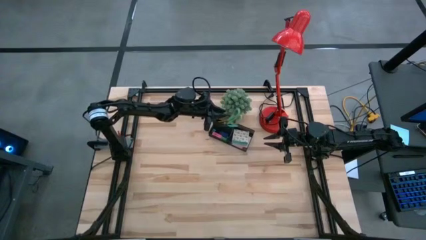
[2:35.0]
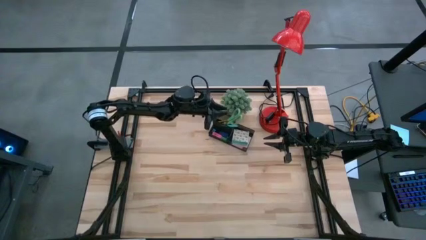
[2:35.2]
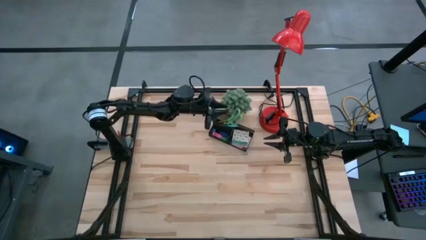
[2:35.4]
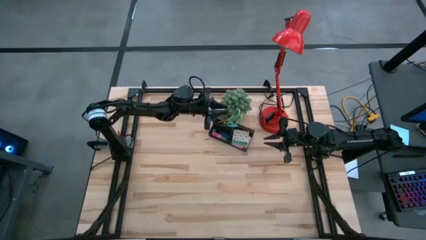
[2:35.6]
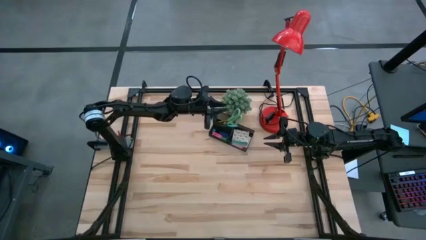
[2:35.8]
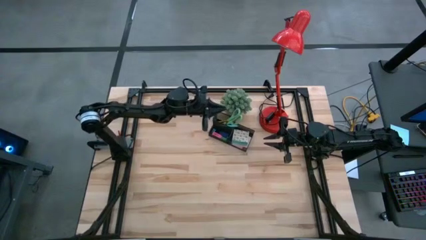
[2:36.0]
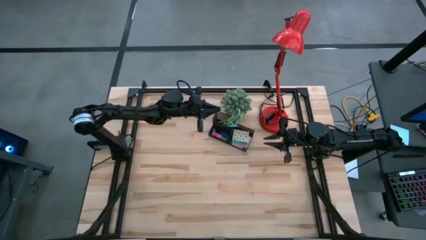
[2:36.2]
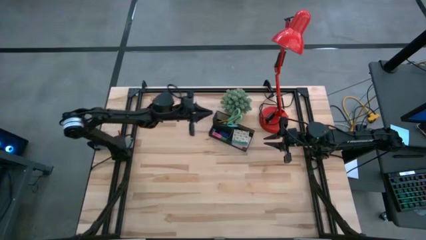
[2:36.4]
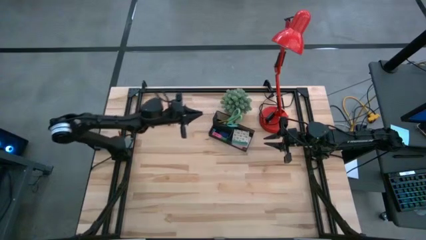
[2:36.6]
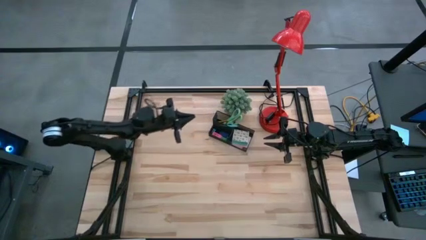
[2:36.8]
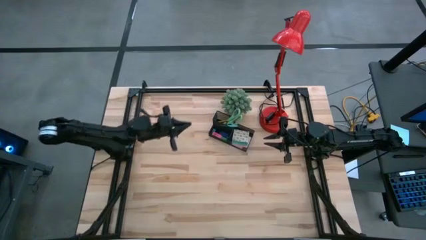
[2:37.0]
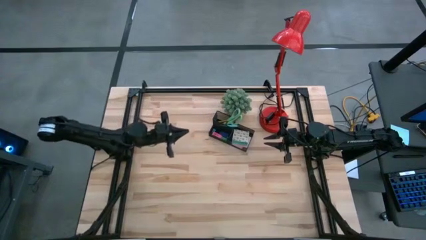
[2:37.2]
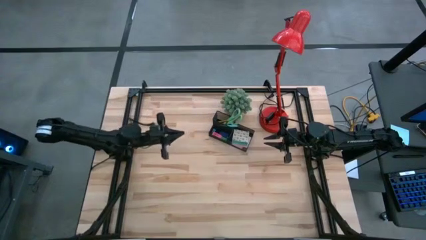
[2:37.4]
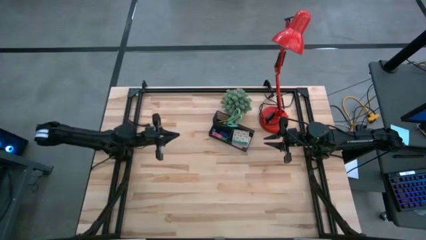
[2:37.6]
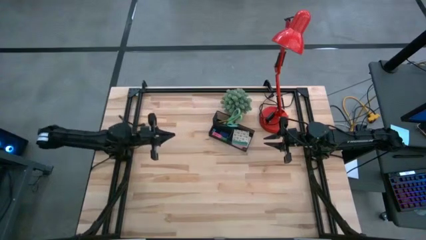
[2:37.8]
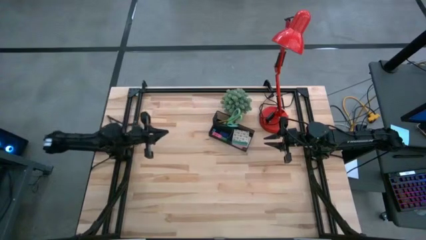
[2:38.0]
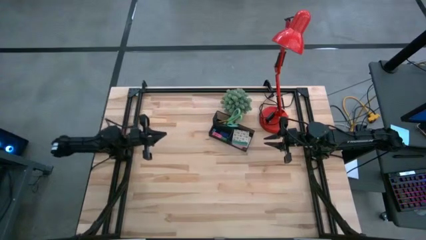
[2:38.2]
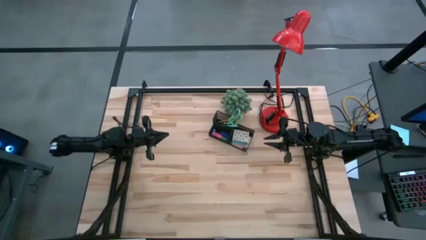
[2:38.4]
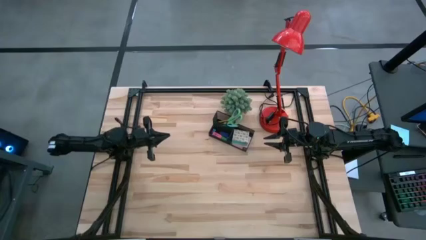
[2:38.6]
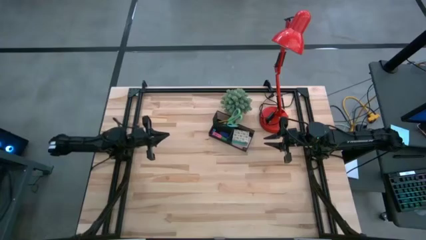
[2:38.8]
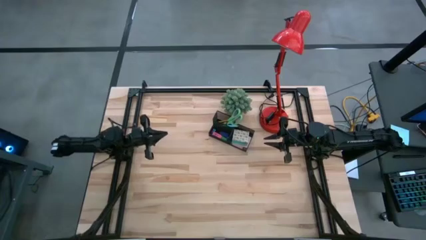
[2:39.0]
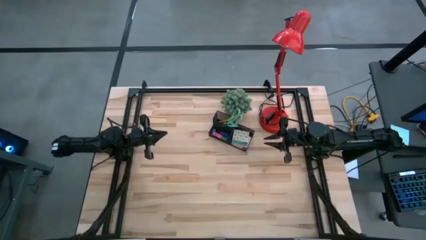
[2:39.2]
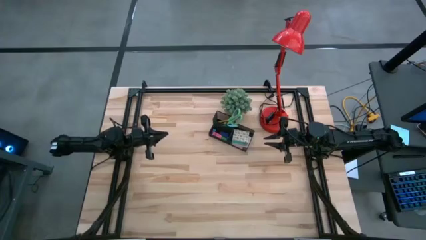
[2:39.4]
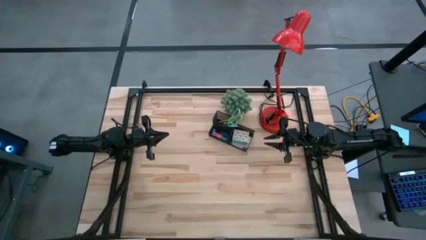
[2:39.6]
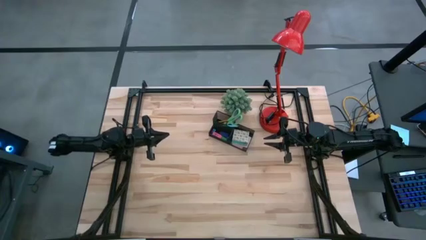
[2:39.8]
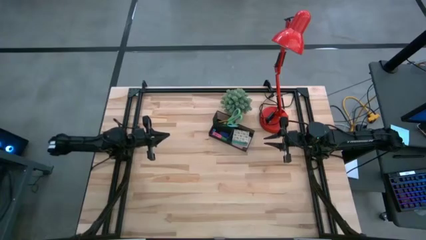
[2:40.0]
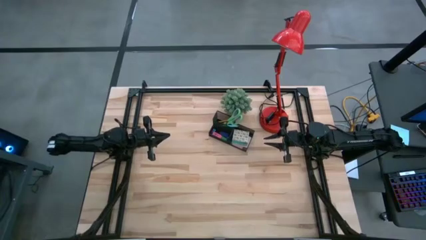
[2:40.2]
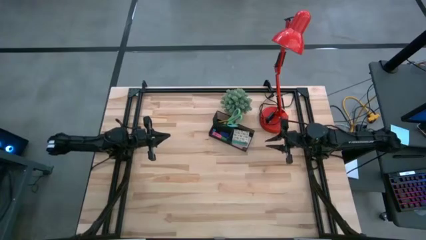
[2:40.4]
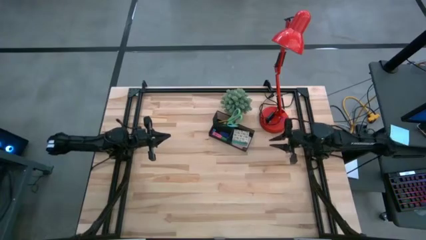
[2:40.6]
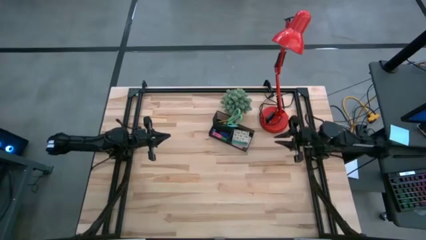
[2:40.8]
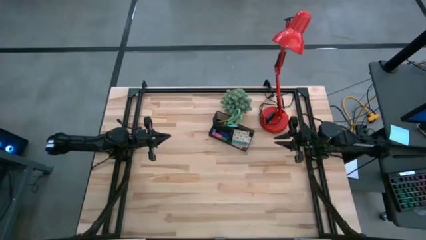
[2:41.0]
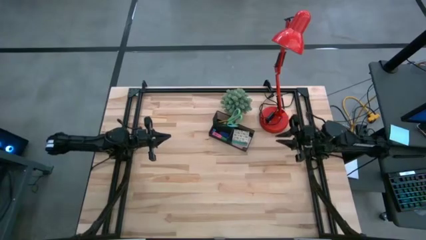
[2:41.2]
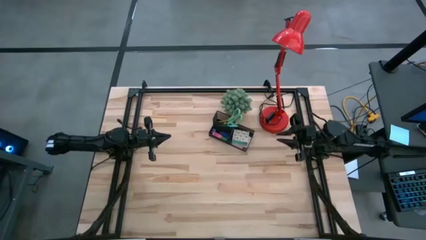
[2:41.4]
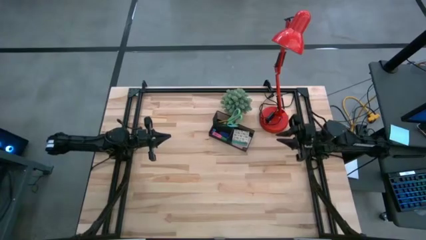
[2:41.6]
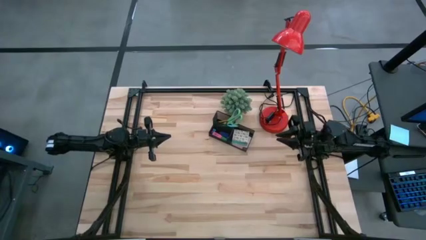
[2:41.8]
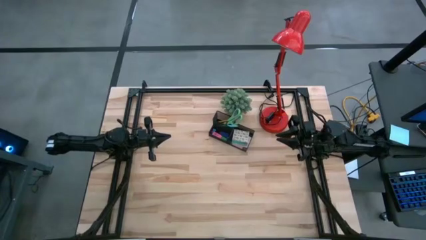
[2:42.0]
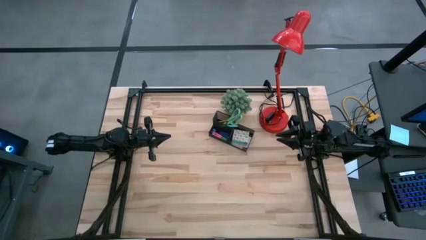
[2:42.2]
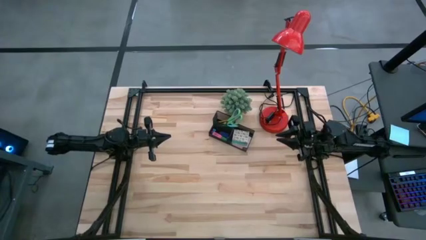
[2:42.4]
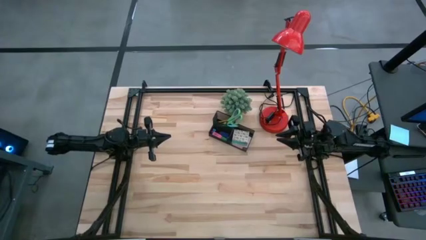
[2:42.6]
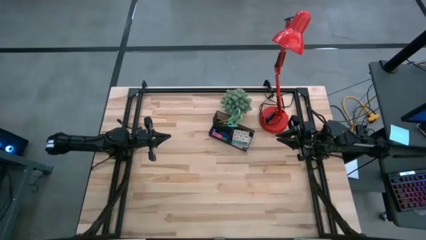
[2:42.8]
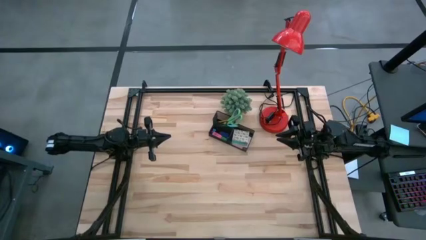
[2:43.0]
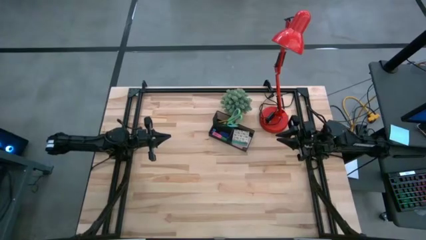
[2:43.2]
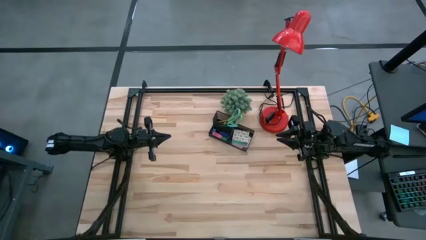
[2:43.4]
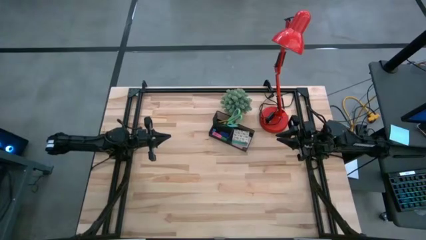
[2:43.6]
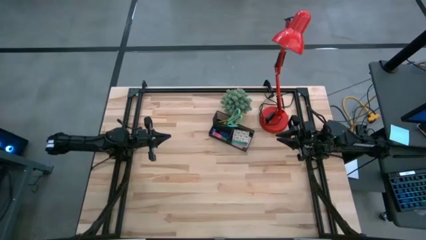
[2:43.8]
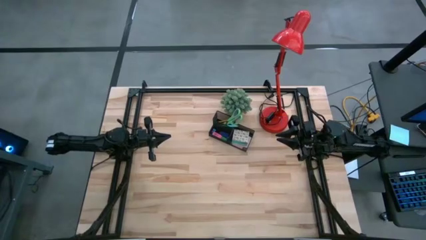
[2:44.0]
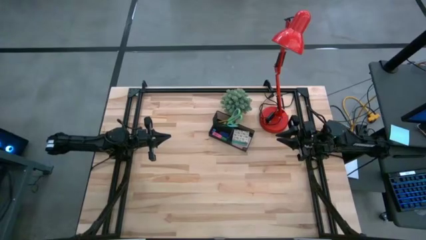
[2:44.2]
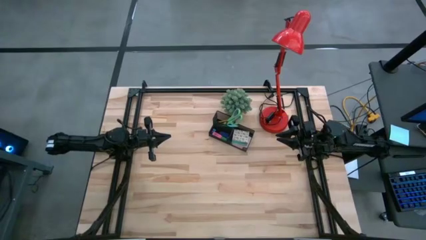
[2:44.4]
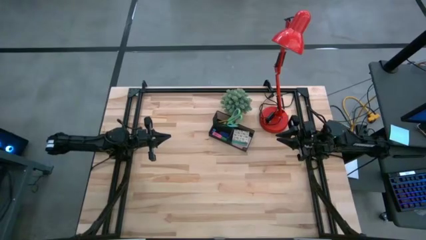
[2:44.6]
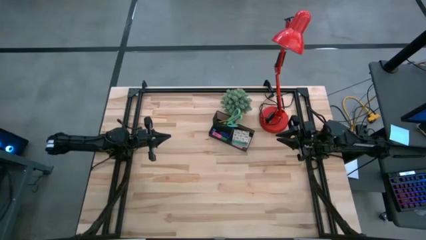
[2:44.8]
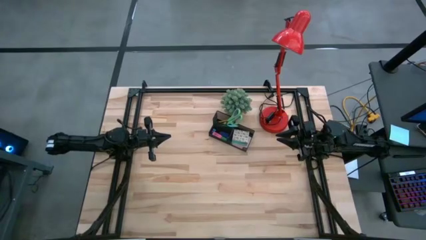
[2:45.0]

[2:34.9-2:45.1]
Task: Pick and place office supplies into organizer
Return to Home Position
